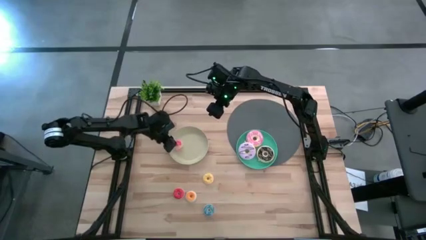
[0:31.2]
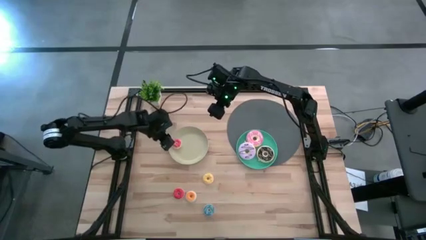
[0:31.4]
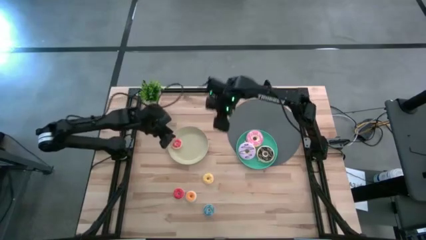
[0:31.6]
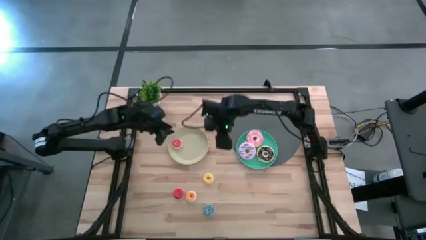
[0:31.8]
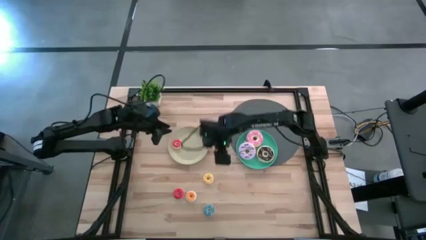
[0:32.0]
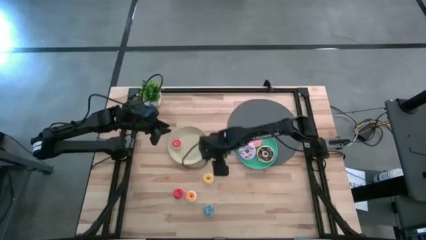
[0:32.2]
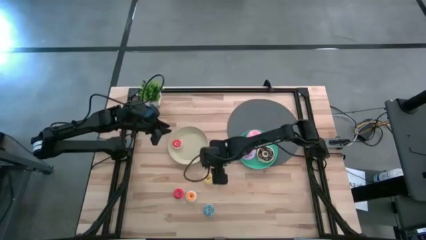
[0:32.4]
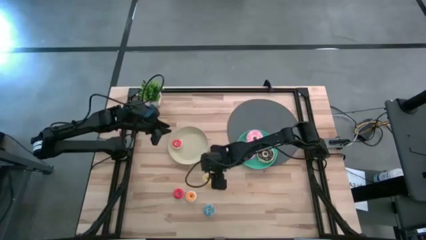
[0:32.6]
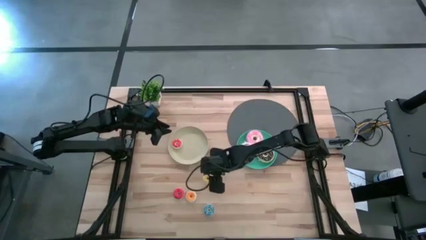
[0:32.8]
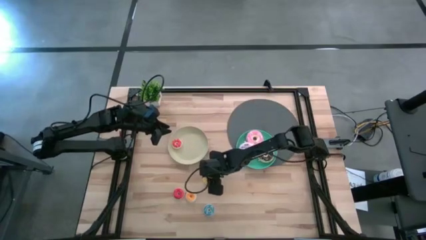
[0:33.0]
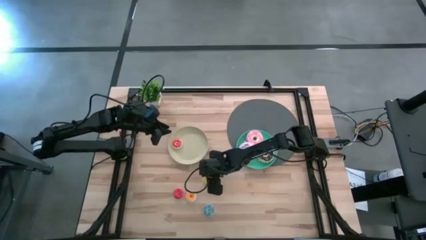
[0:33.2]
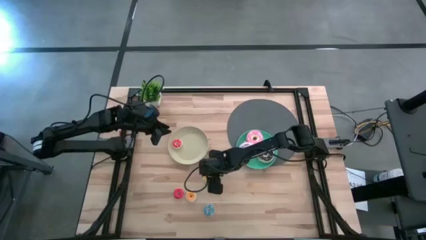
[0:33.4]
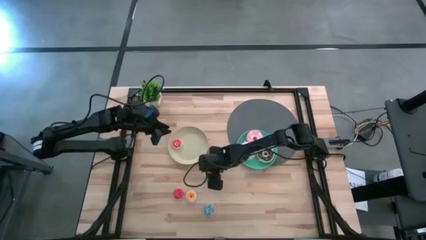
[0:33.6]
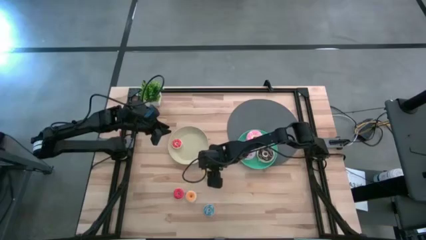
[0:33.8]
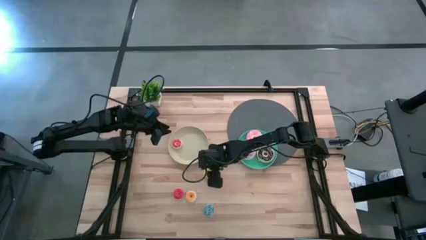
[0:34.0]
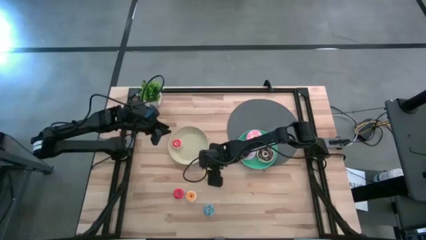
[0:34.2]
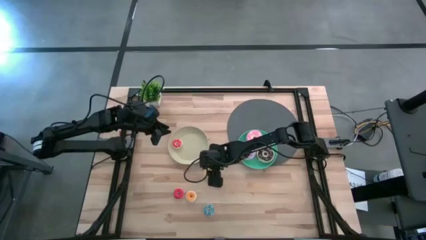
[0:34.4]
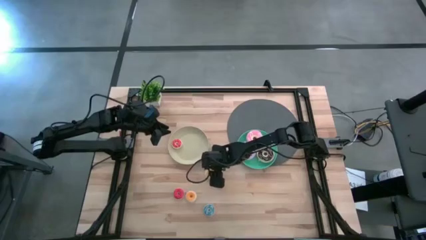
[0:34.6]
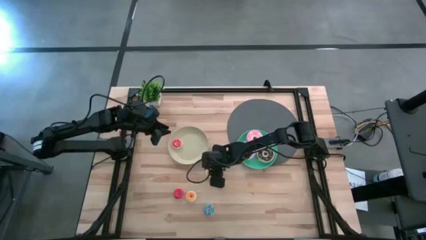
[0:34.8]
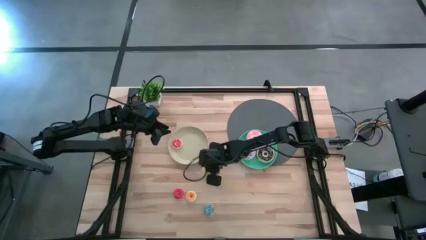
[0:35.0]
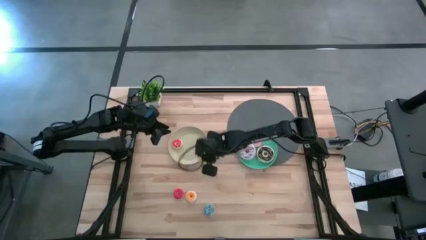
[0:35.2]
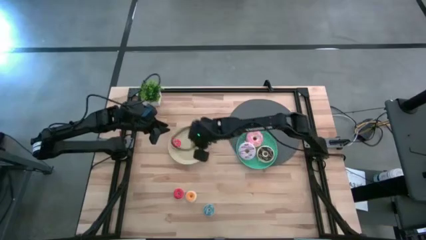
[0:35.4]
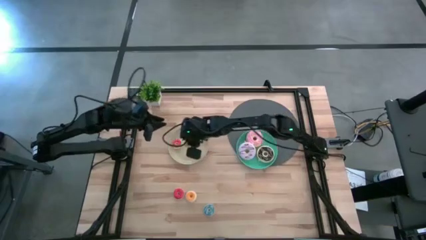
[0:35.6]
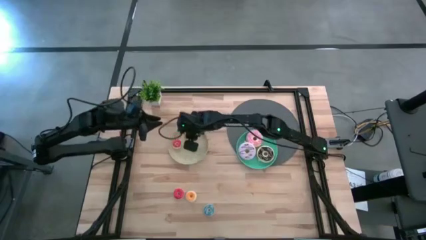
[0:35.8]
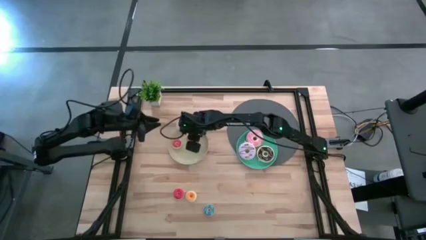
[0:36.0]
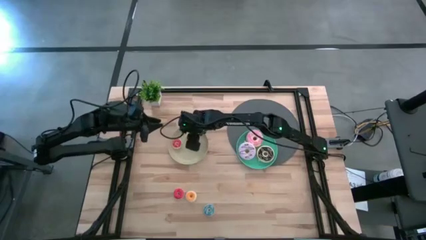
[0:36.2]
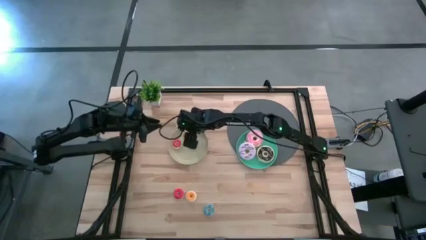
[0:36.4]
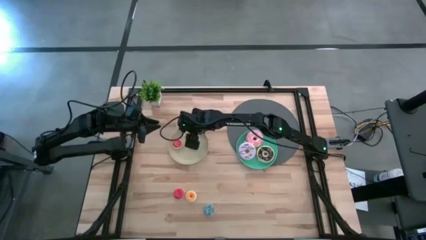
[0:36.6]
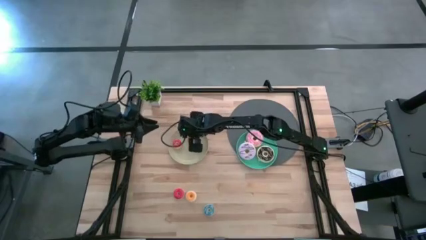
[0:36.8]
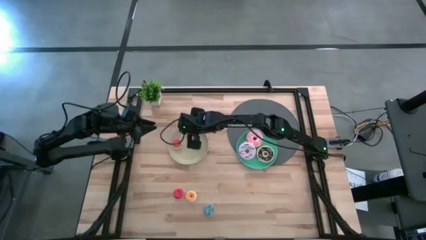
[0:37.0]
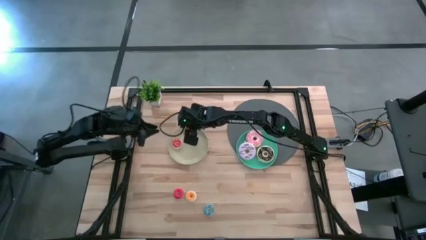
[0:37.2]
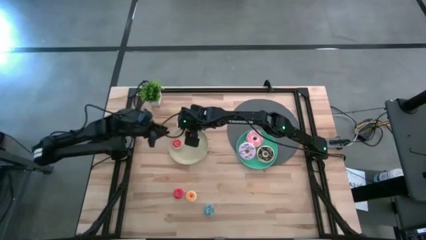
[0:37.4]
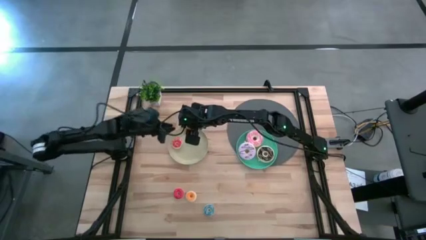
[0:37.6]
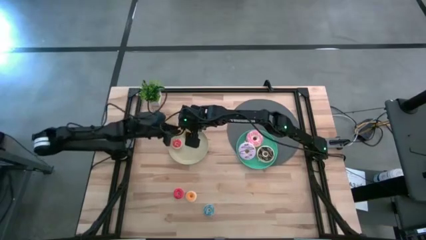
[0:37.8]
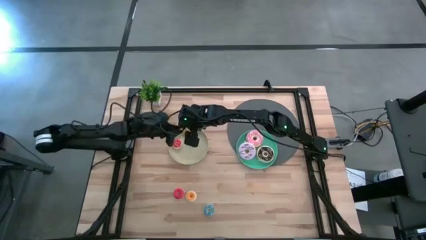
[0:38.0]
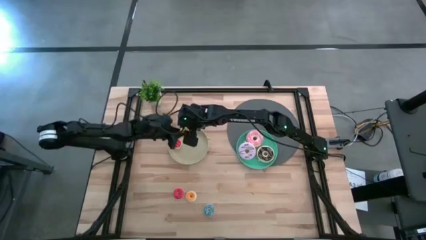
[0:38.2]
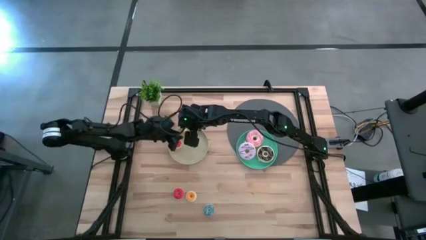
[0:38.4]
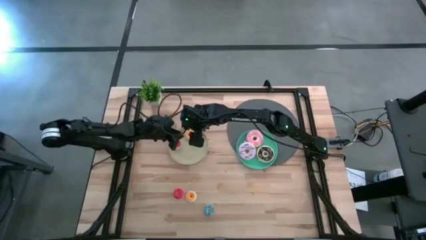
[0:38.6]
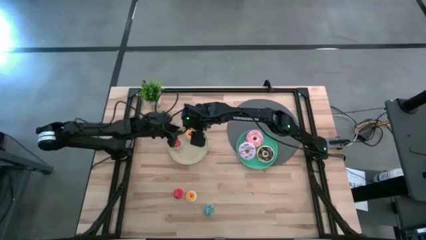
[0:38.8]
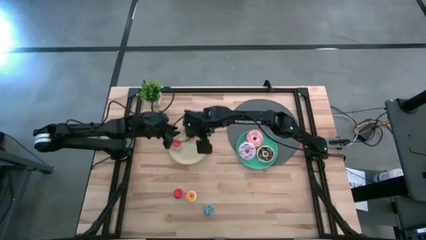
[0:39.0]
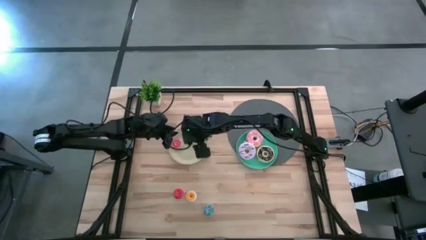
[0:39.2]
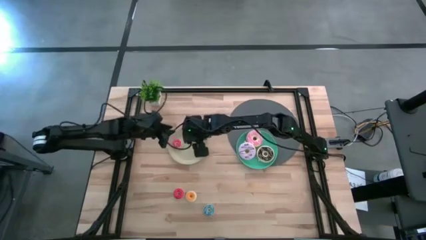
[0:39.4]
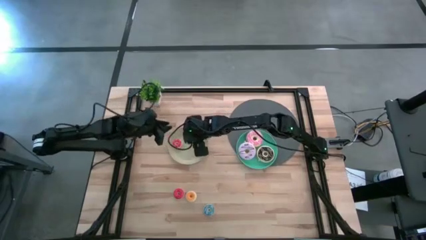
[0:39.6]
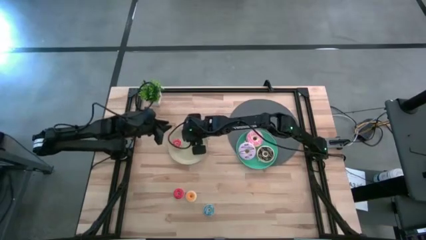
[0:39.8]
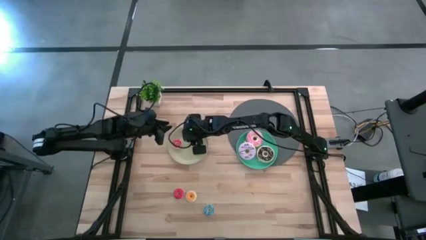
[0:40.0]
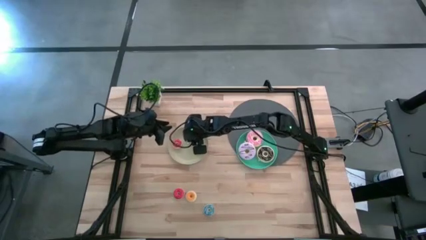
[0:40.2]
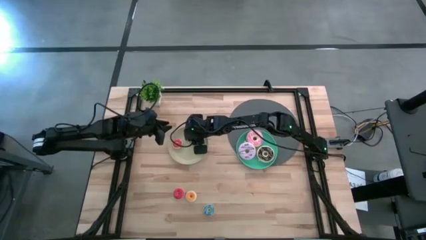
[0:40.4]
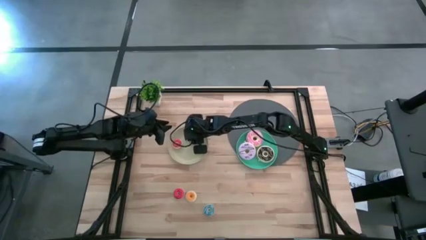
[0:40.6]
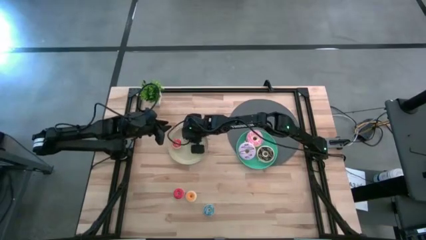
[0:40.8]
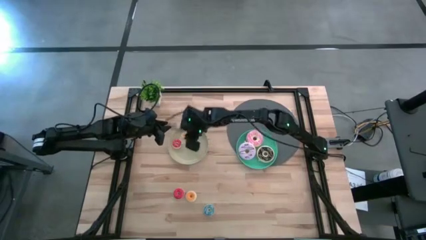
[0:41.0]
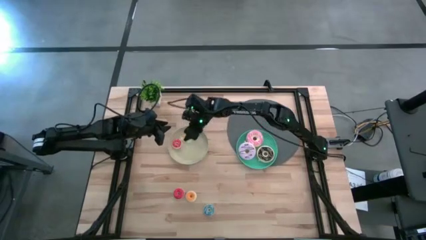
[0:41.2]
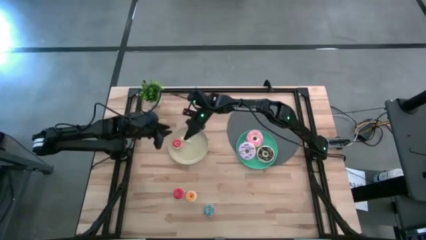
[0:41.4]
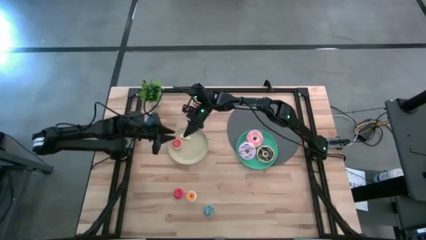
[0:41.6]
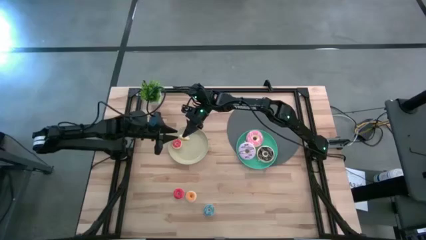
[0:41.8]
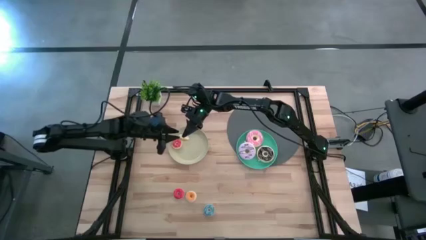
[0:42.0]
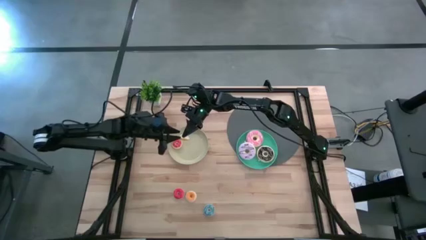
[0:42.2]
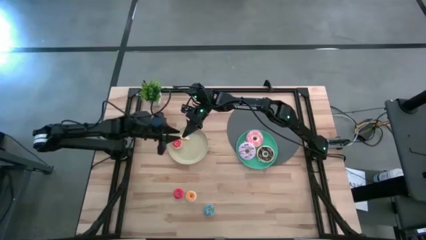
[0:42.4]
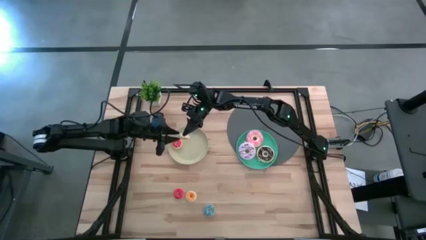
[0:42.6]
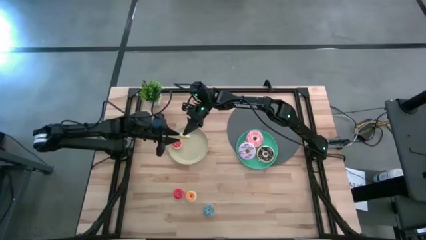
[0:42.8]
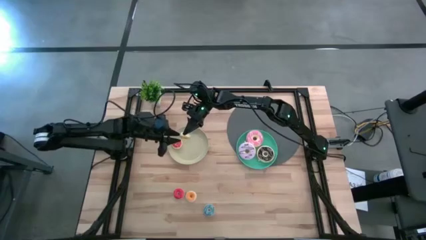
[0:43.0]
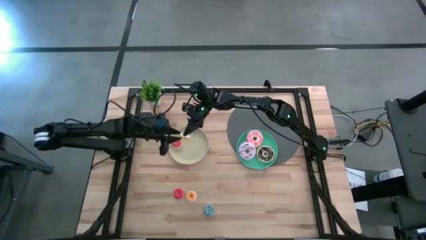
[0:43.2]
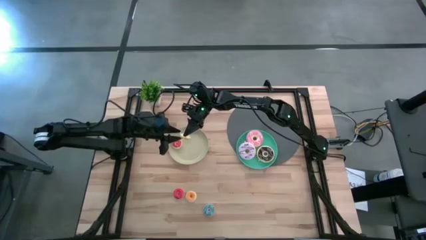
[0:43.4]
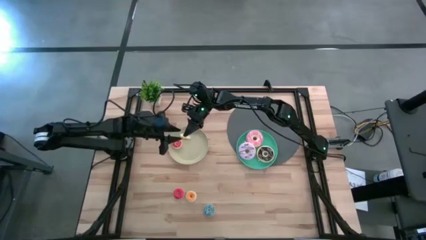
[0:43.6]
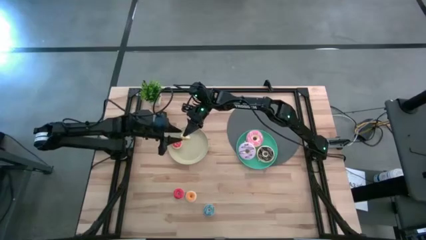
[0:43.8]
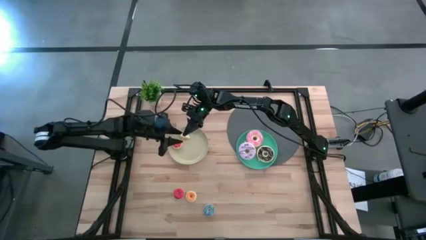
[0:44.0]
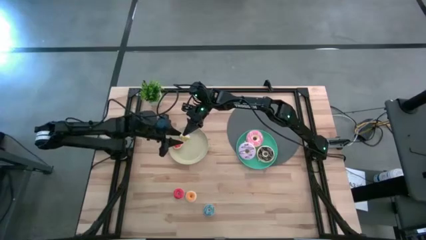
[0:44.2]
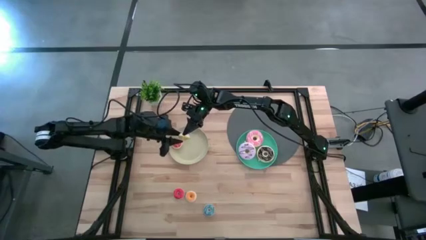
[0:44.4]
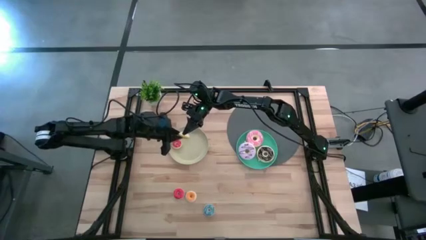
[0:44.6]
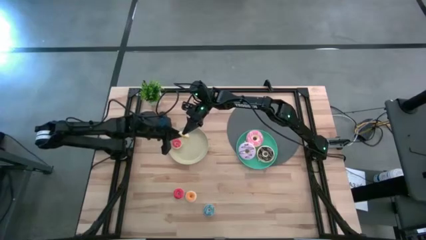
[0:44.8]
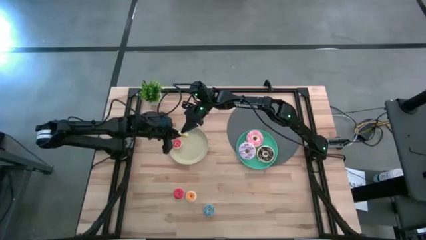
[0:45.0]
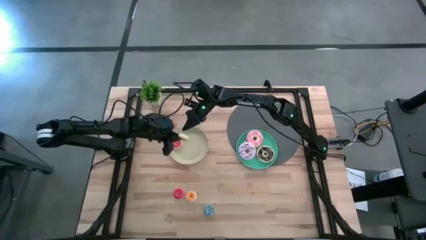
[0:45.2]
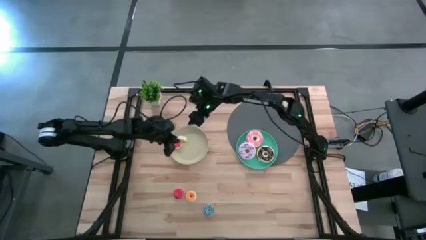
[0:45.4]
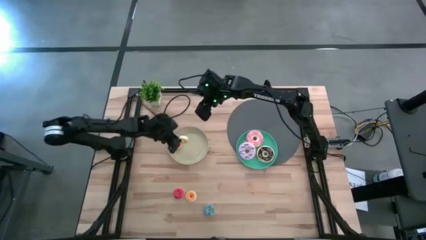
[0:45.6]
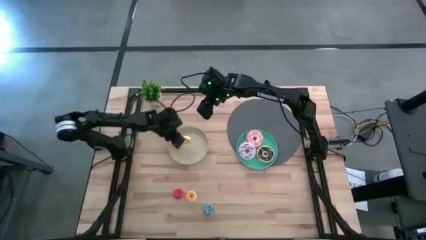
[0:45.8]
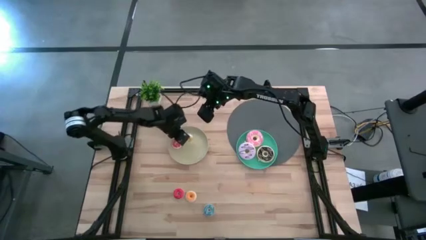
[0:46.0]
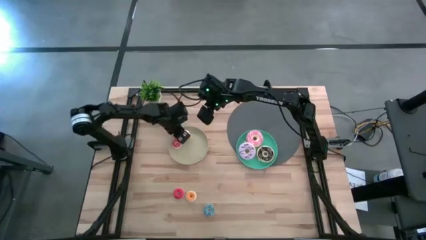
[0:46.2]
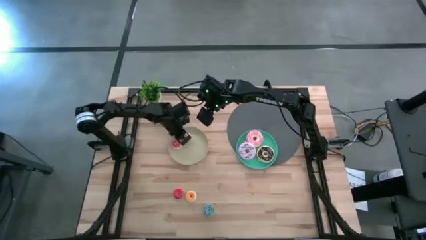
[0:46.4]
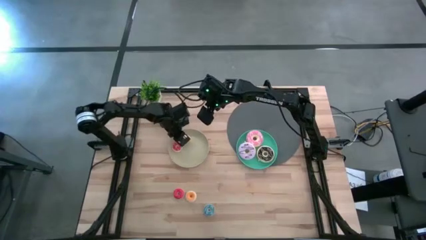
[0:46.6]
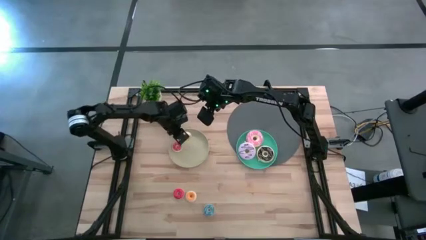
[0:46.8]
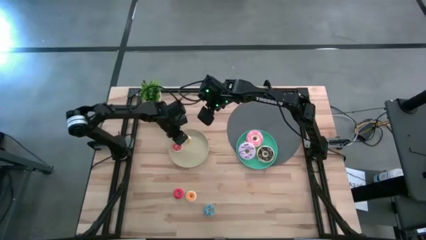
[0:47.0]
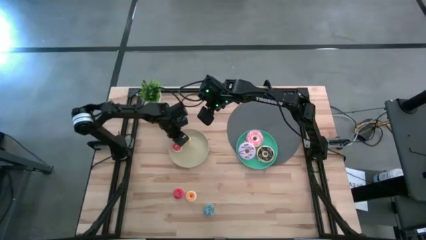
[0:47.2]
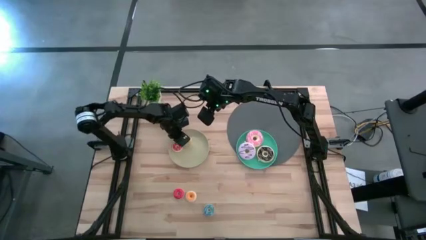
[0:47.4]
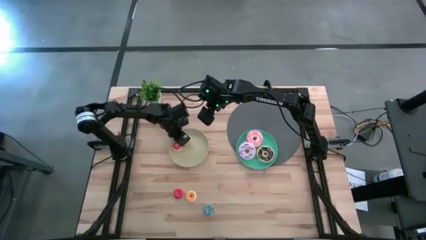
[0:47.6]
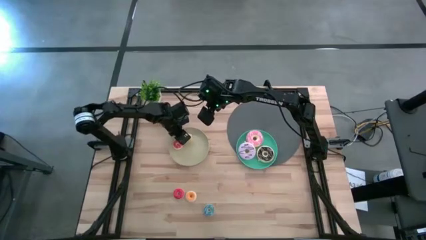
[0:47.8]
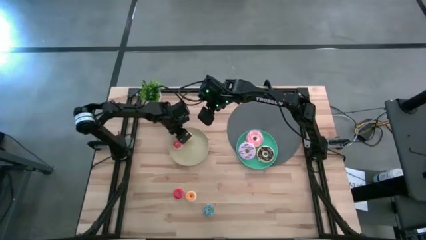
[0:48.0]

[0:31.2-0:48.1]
Task: Pick & Place donuts
Put the small yellow donut on the brown plate
